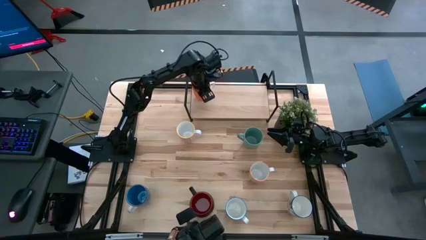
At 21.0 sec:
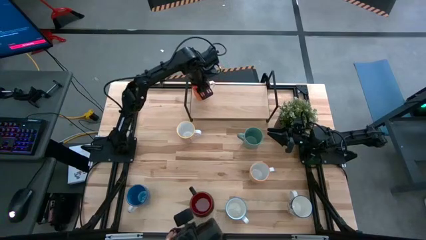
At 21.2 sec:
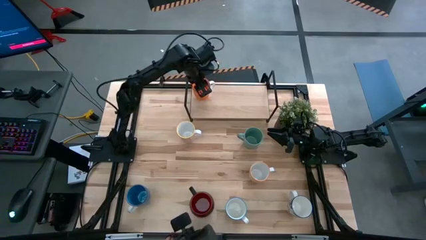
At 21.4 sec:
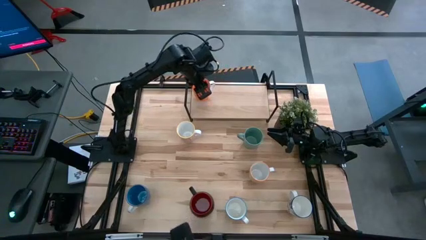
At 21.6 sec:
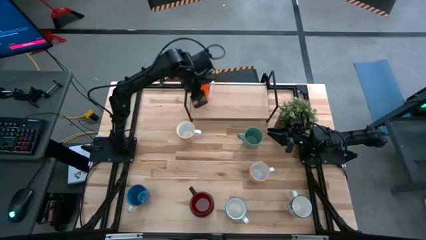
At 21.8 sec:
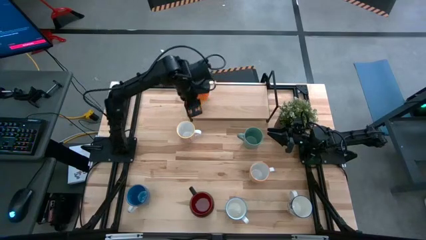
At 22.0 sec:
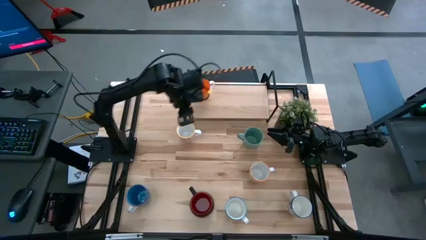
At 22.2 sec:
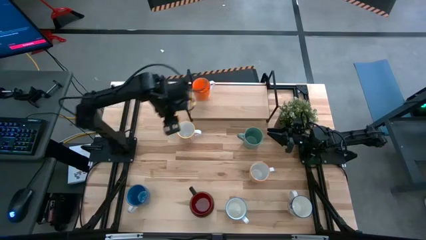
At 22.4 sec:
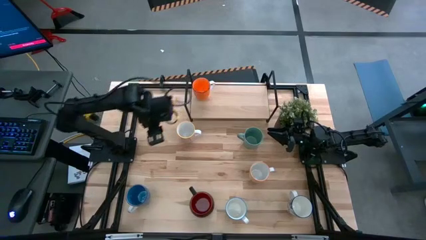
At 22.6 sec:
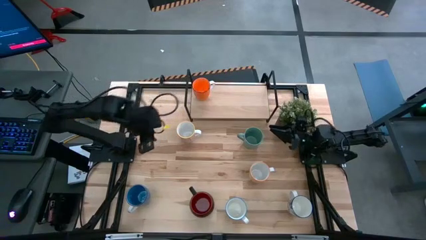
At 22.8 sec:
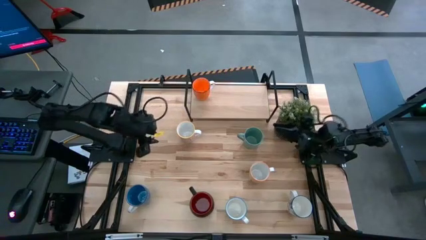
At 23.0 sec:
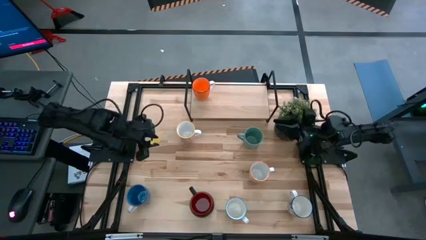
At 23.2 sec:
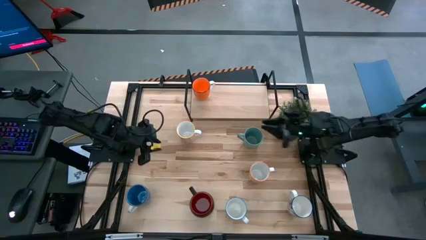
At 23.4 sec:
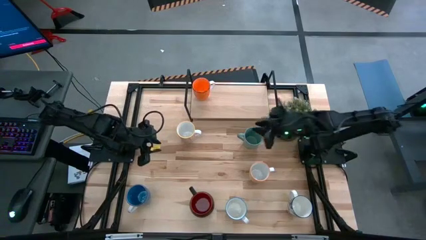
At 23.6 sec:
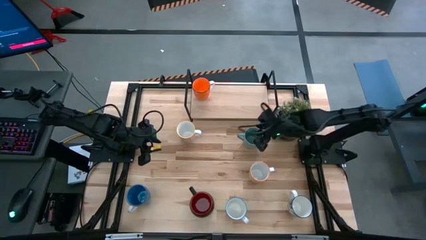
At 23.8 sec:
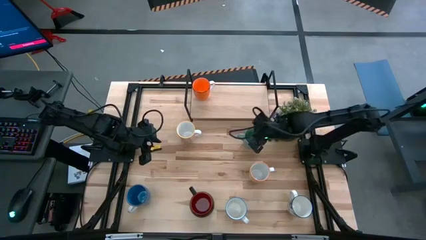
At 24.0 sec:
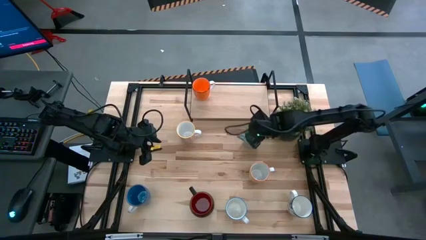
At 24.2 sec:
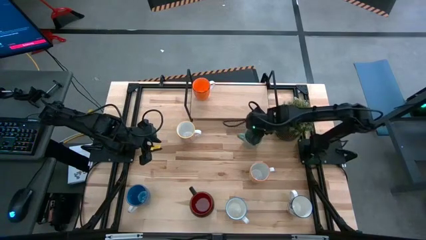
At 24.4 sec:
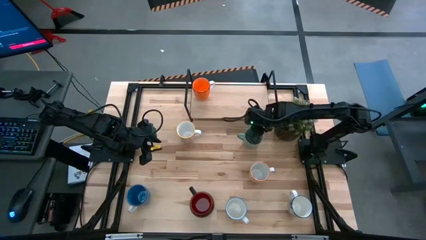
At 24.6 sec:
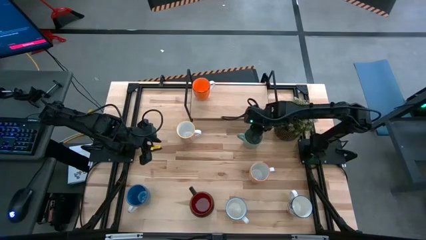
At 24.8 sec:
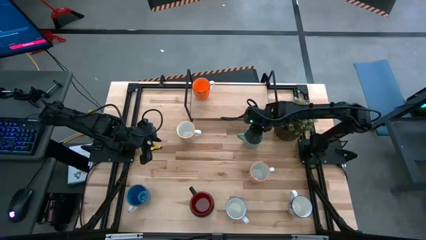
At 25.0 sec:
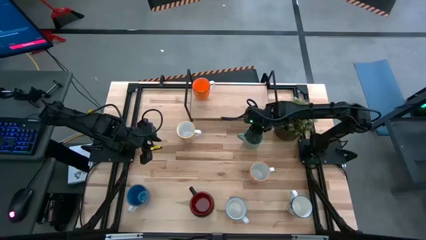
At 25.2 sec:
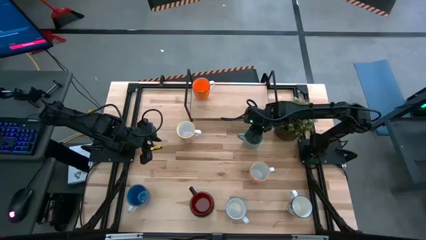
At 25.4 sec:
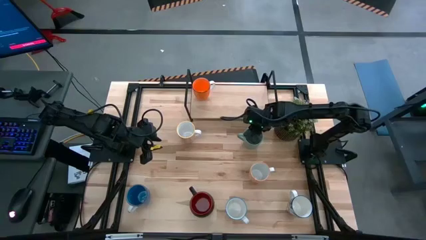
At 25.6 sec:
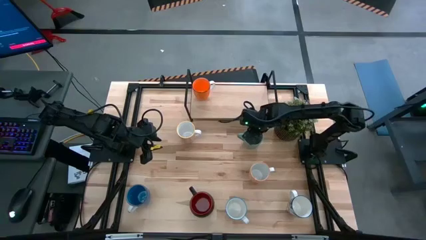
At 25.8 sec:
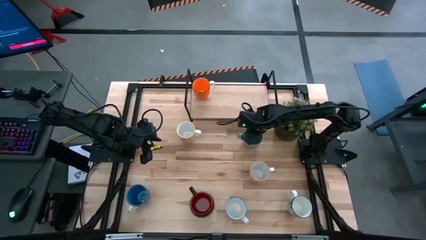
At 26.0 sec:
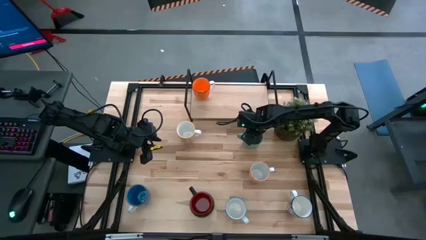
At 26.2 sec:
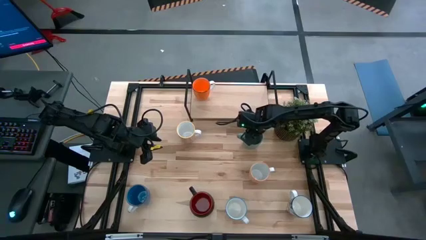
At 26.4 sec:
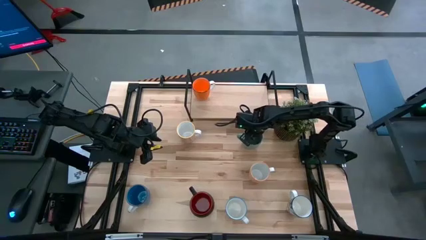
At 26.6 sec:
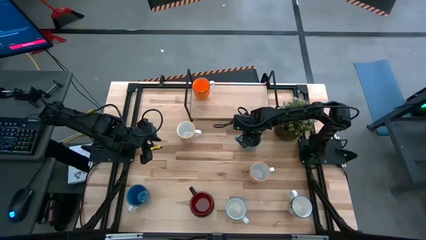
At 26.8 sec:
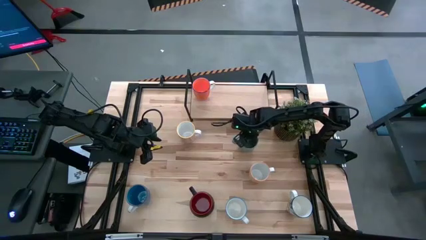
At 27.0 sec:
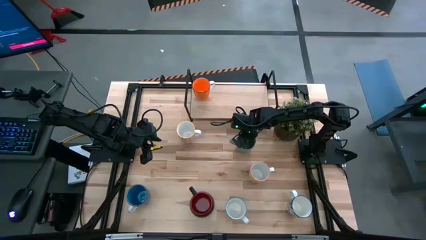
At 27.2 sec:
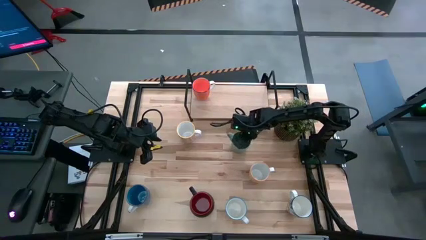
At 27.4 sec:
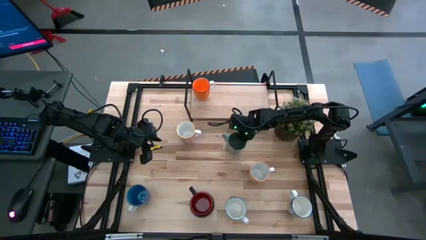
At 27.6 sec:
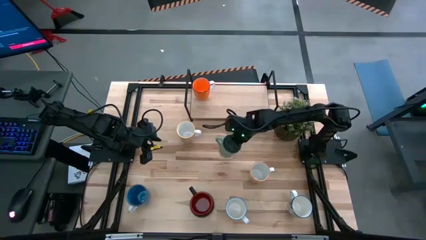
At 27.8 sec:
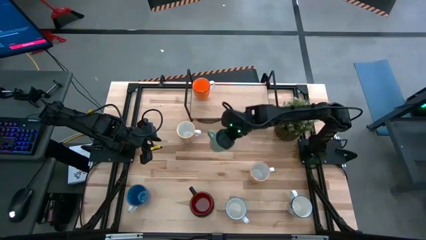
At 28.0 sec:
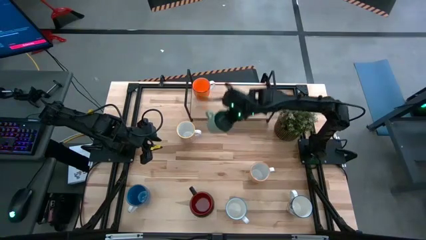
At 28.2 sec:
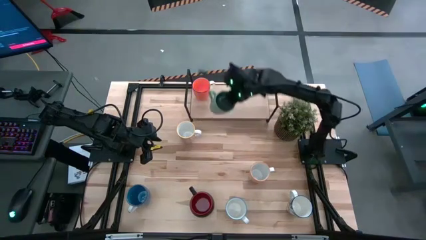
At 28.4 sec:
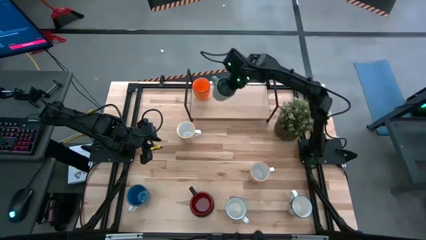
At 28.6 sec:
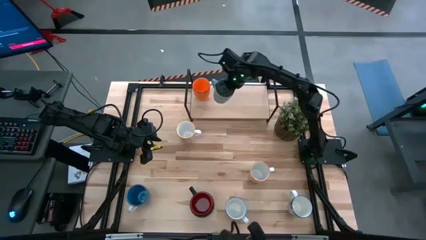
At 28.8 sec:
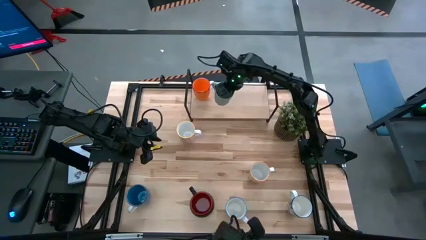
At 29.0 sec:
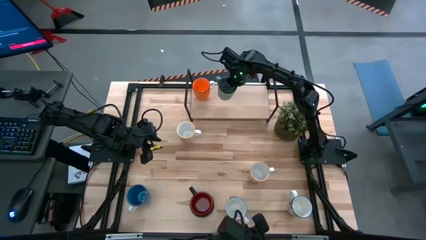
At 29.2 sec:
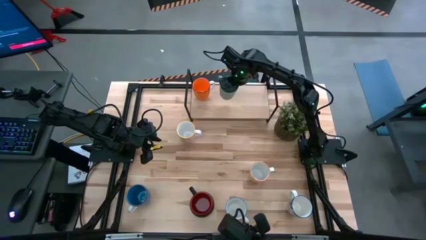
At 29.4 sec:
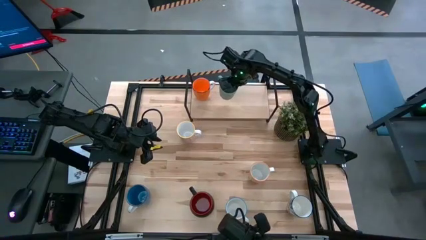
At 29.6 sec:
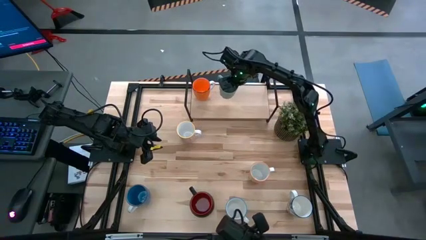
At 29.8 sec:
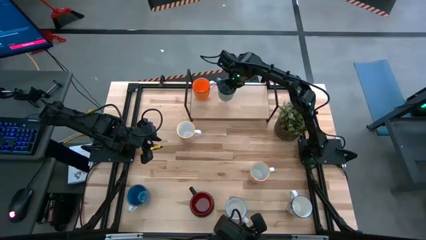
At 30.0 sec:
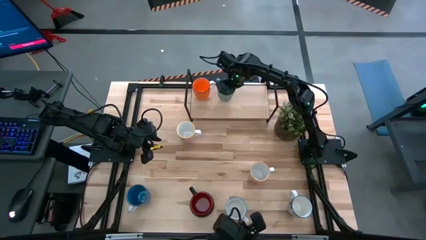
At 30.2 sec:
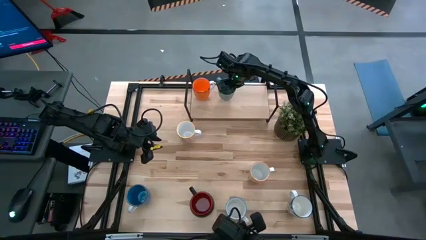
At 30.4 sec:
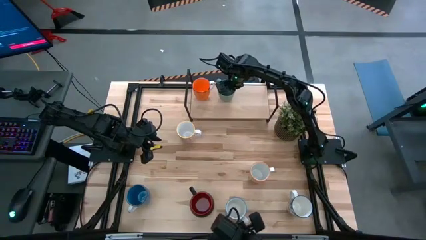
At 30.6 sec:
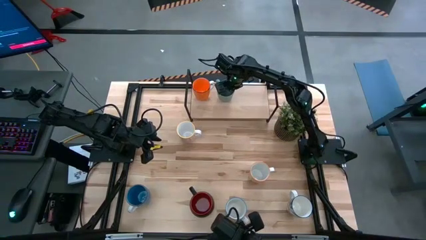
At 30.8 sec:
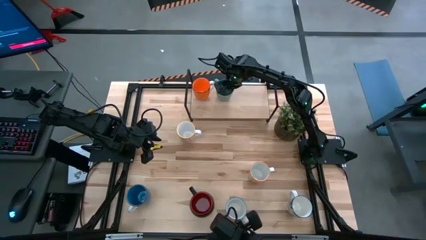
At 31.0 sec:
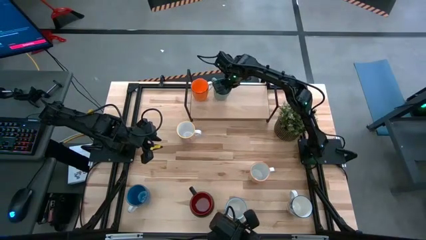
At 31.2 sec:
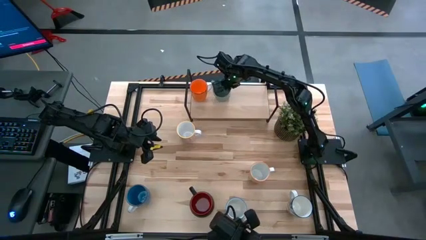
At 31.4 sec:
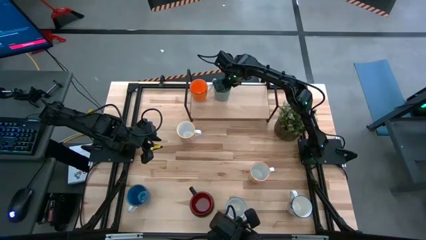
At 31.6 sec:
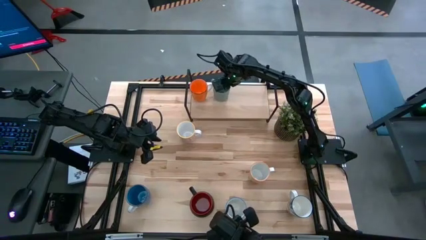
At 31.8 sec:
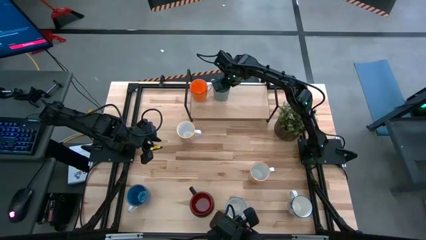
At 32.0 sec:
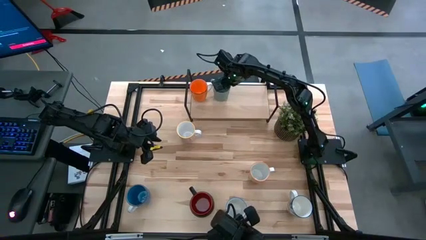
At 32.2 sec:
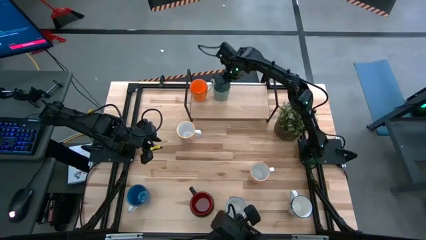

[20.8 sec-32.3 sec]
Task: Place coffee mugs
Put the green mug on the shelf
